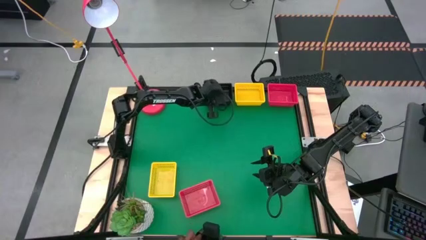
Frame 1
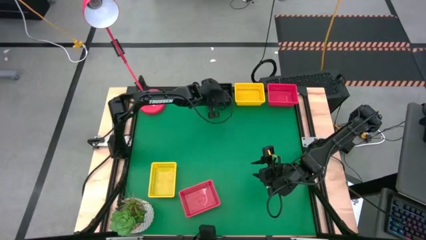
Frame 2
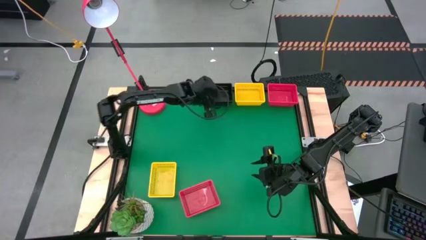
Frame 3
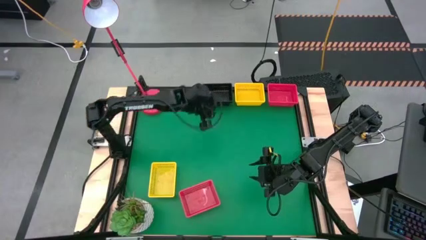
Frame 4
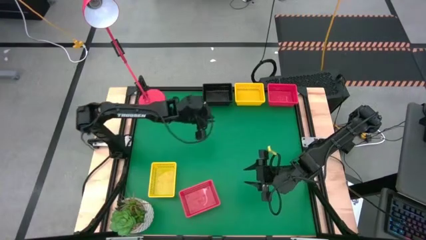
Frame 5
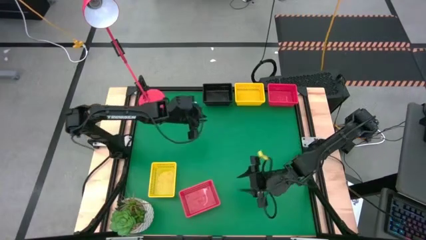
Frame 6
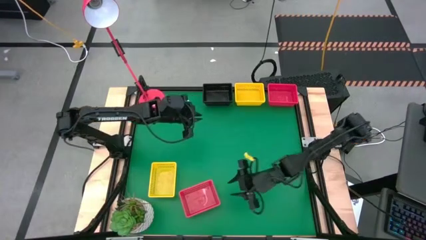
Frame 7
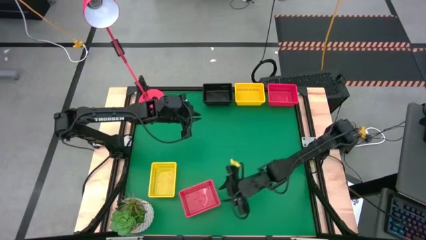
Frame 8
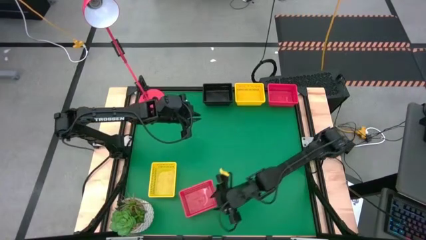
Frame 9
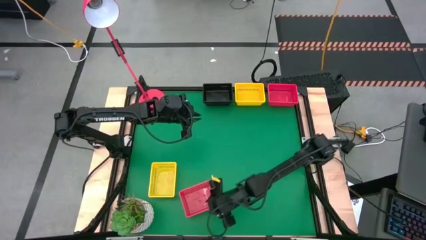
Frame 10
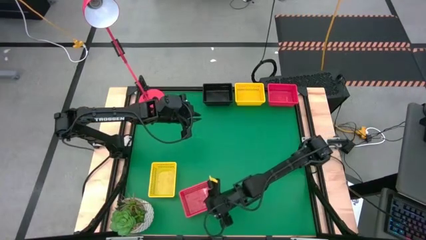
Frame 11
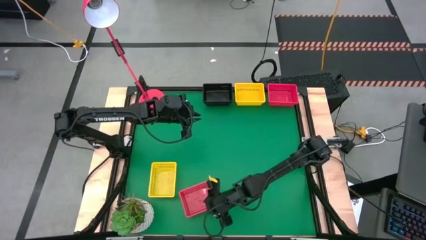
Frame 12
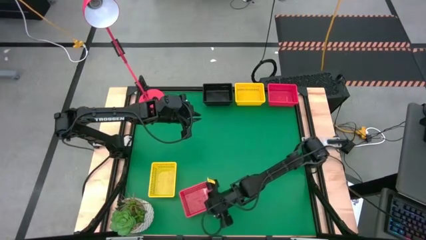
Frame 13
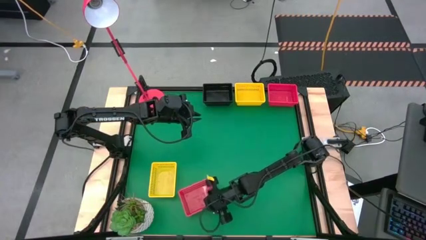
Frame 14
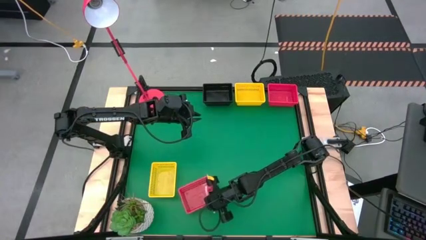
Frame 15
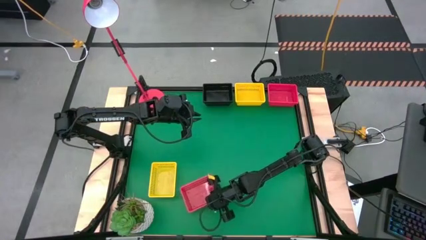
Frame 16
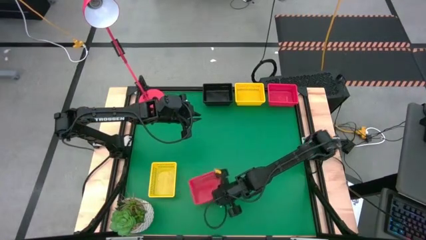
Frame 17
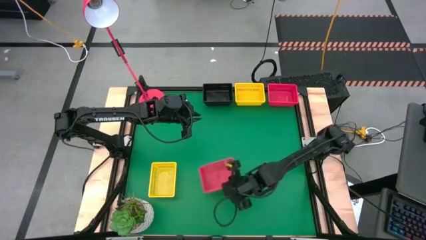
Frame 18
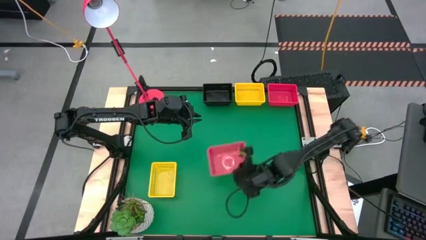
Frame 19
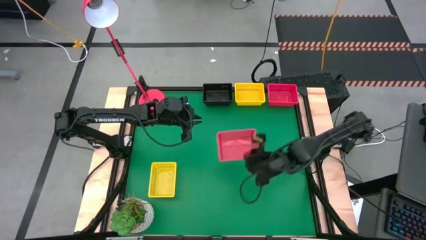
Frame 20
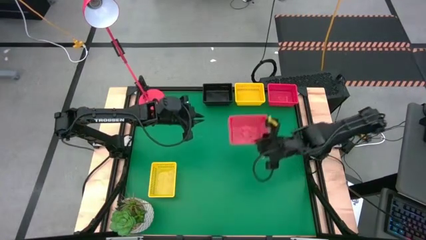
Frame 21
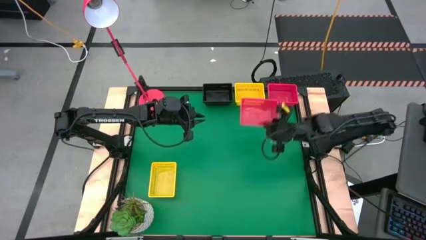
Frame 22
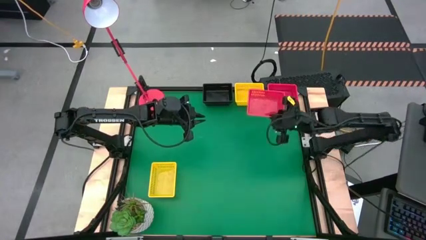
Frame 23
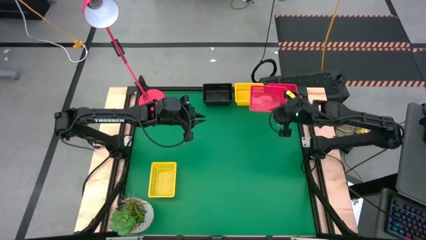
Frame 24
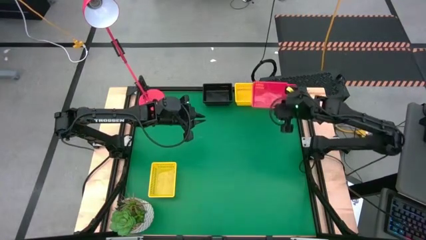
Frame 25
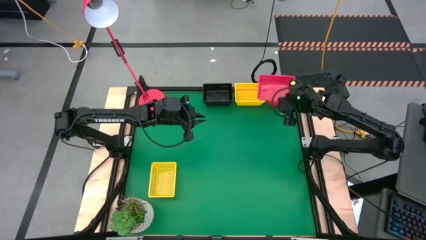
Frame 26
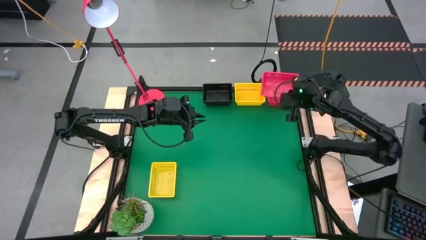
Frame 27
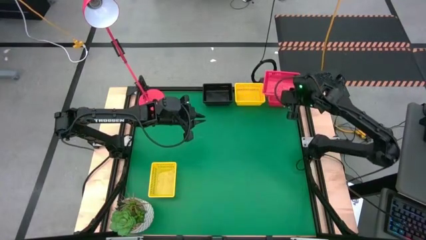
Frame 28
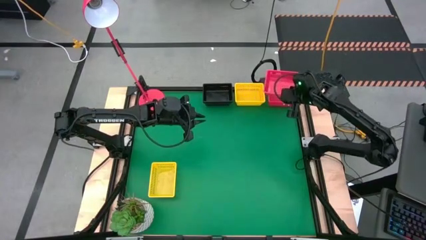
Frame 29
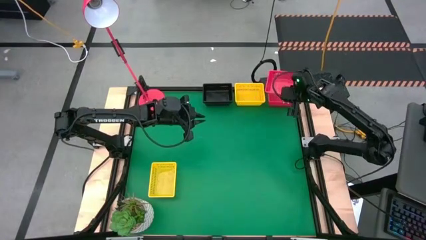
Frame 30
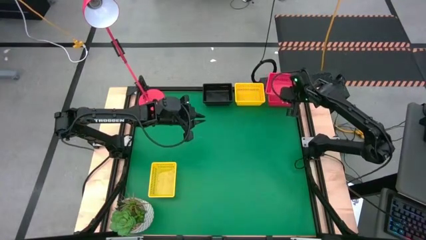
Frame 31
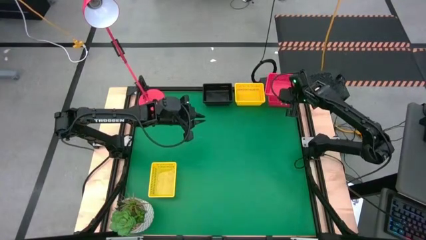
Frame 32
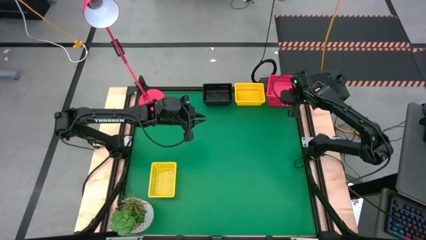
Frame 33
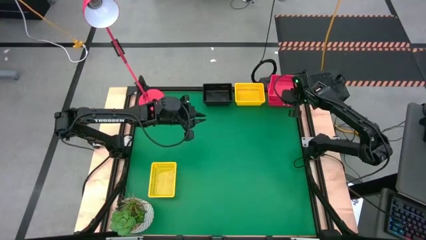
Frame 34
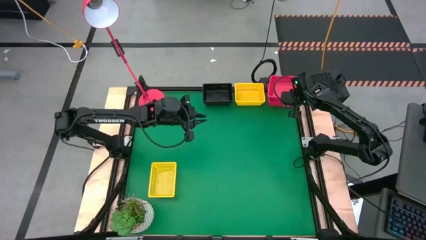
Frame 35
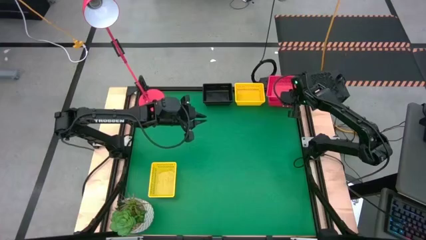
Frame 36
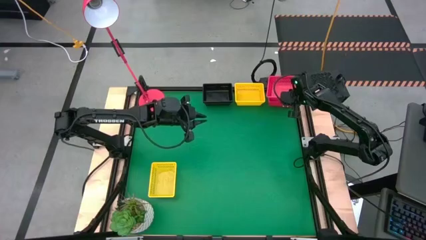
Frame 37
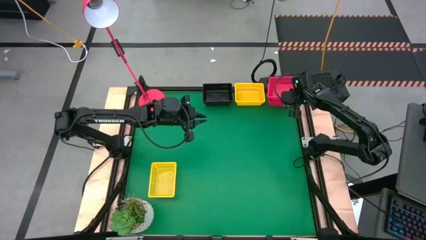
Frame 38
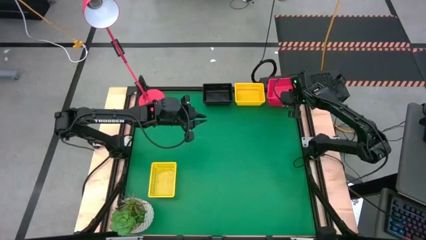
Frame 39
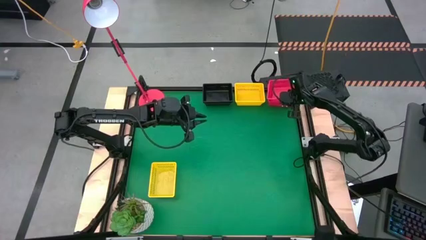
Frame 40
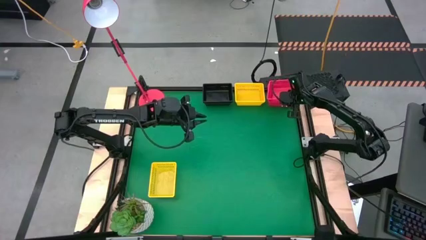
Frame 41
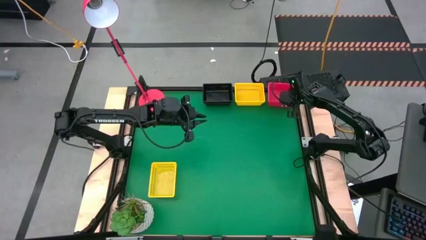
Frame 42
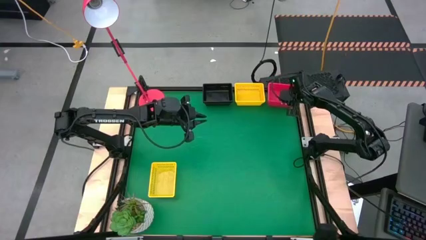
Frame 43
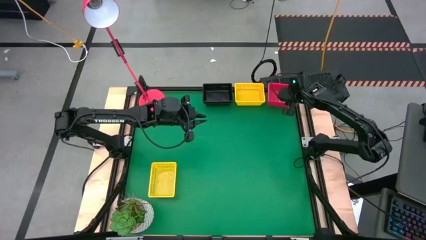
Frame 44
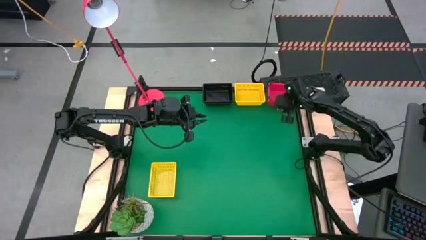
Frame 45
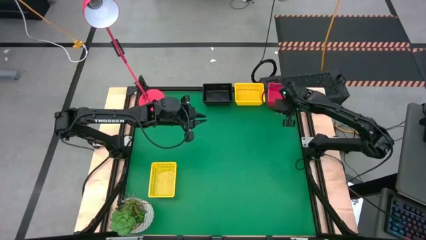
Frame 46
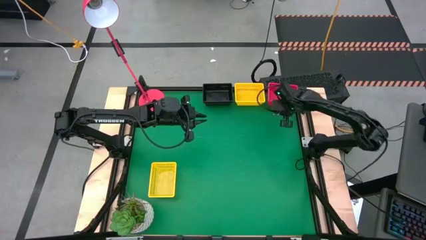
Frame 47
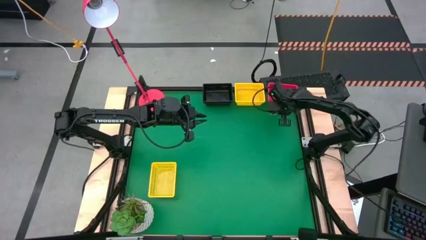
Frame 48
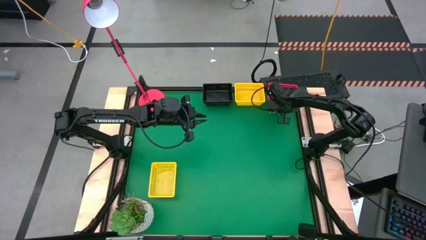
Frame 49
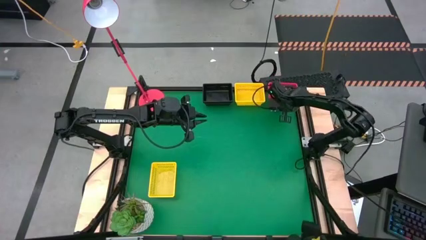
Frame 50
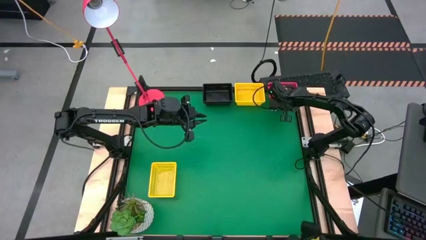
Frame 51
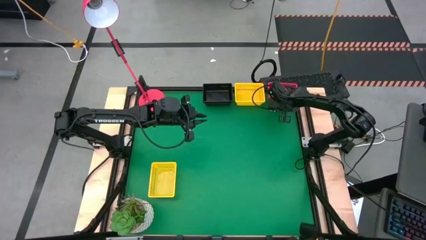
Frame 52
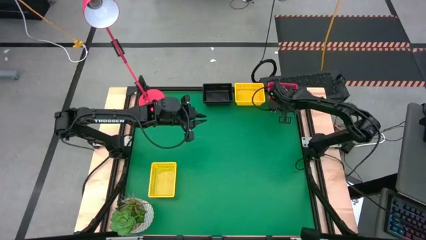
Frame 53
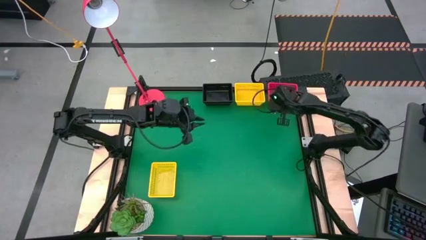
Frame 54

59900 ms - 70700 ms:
Stack the bottom red bin on the top red bins

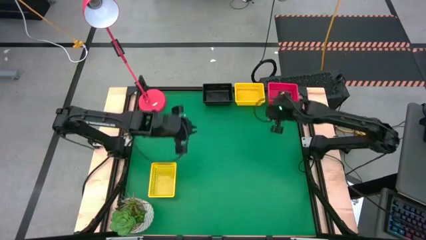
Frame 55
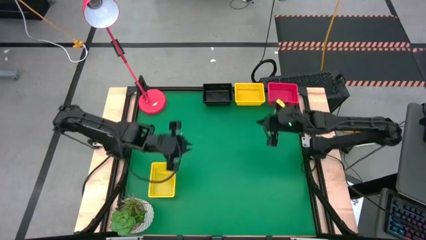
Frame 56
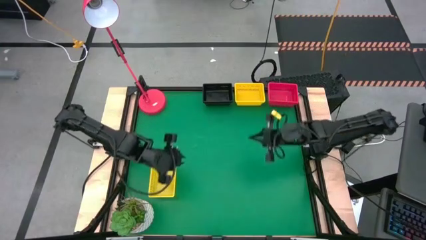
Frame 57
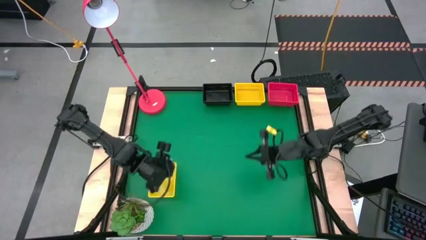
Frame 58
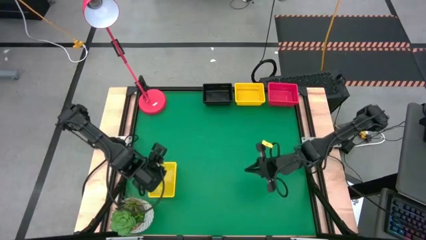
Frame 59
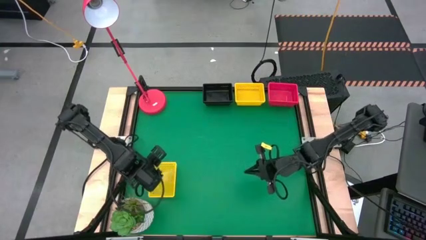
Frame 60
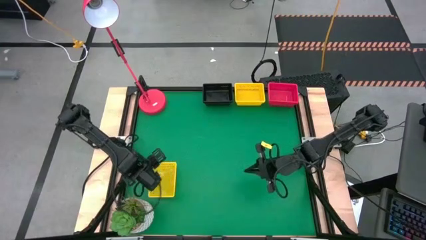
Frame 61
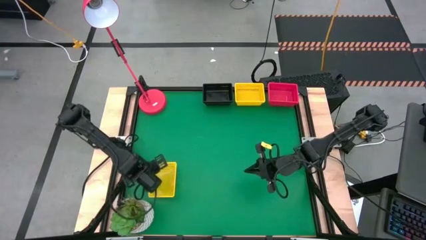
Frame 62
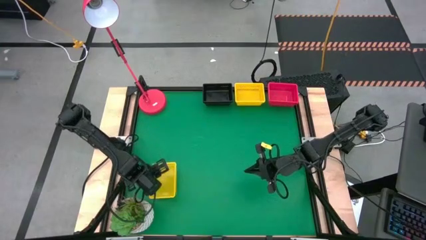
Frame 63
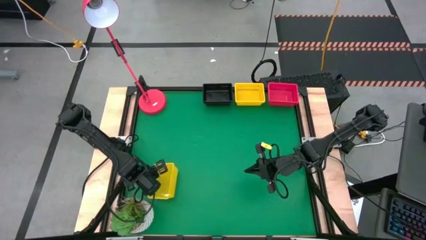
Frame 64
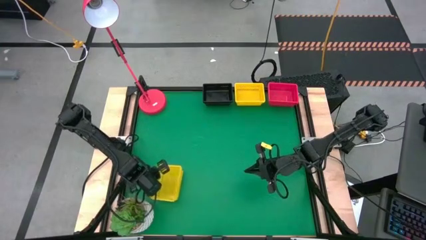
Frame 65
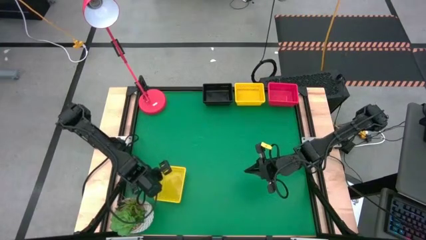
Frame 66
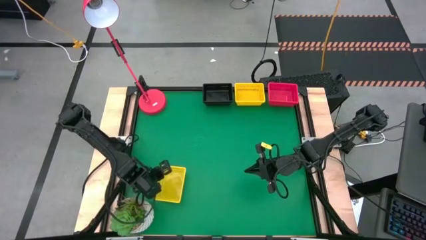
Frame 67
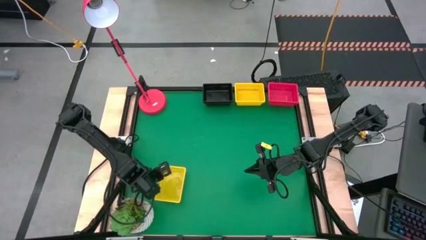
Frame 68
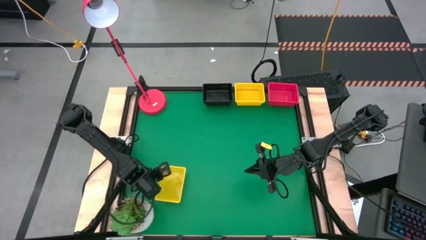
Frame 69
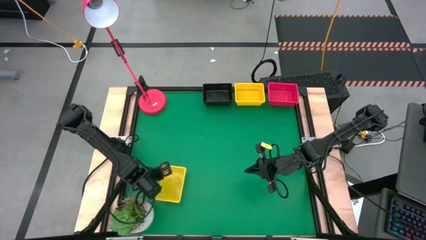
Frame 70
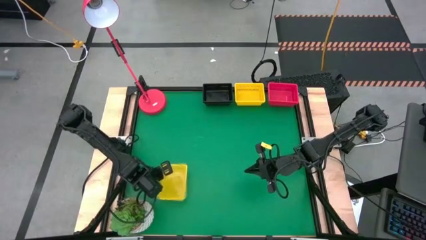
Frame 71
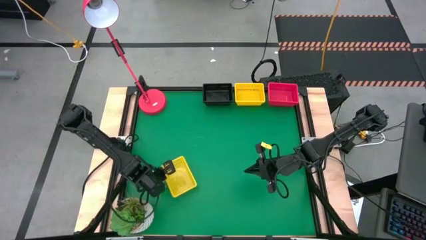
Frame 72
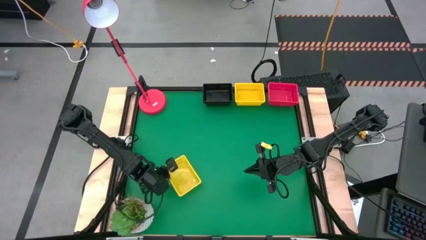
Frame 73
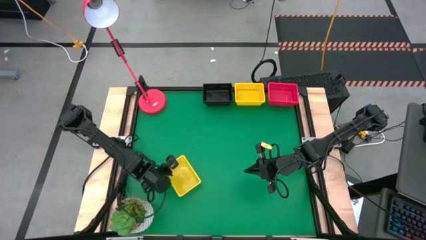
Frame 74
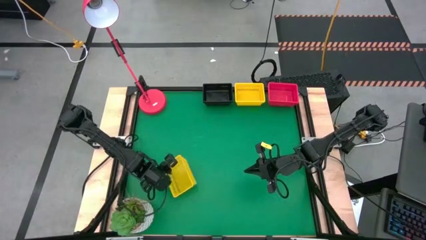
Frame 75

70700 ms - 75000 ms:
Stack the bottom yellow bin on the top yellow bins
